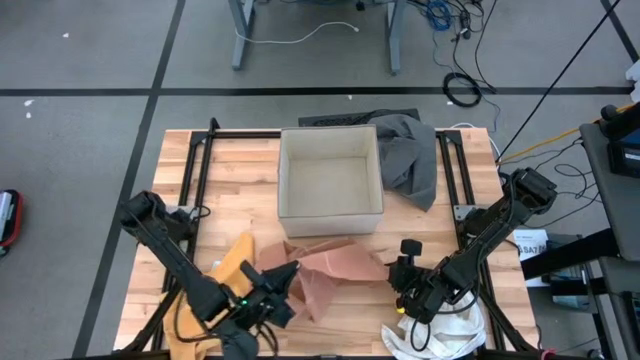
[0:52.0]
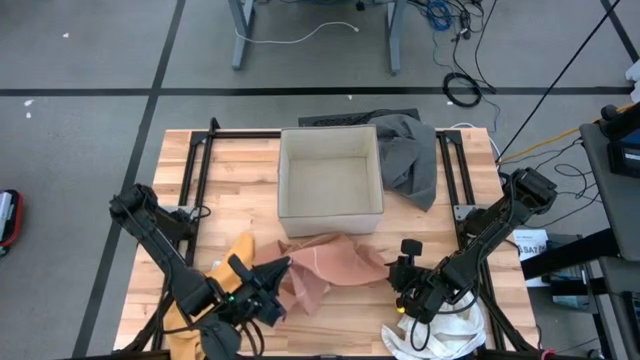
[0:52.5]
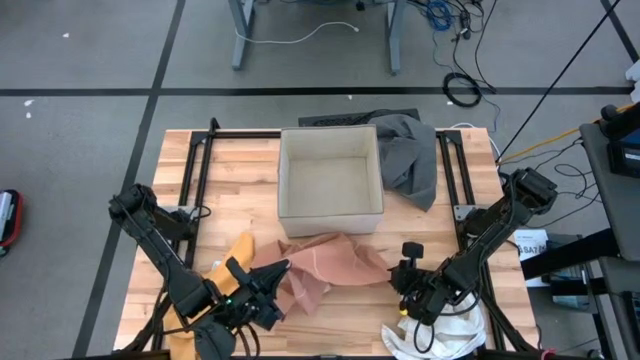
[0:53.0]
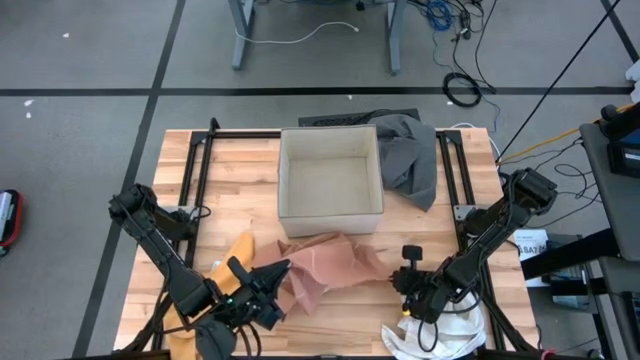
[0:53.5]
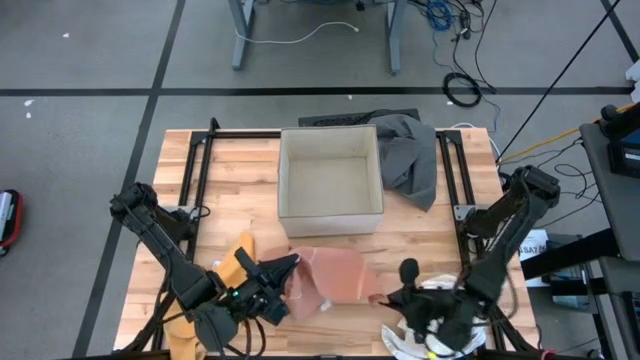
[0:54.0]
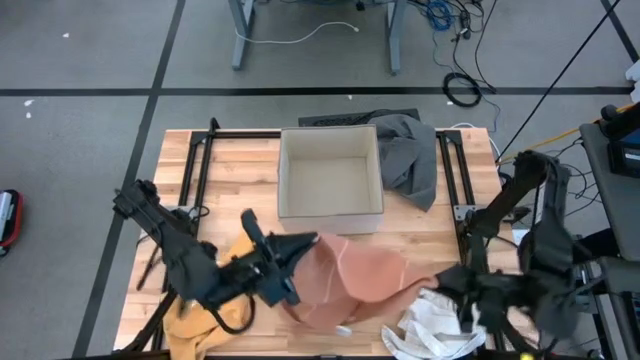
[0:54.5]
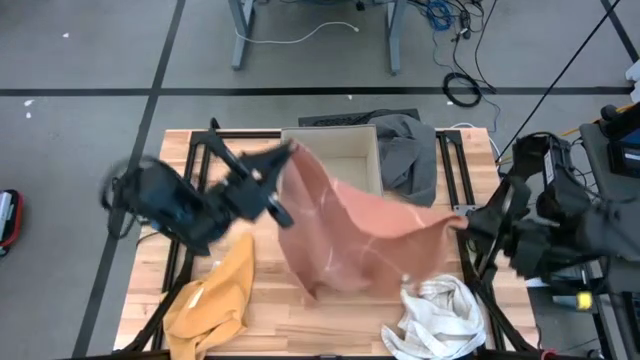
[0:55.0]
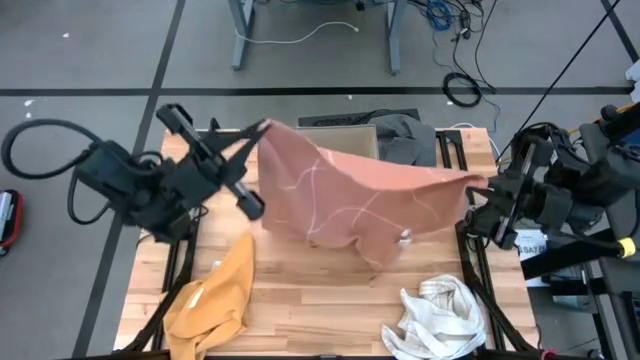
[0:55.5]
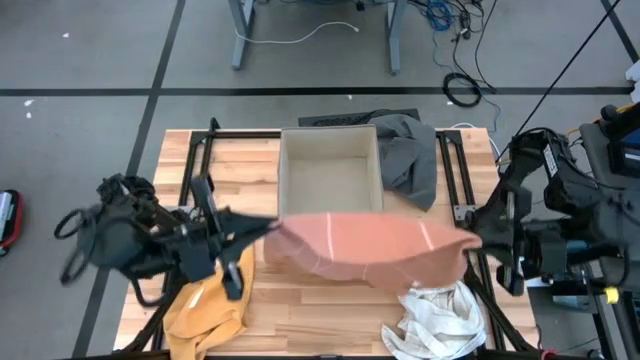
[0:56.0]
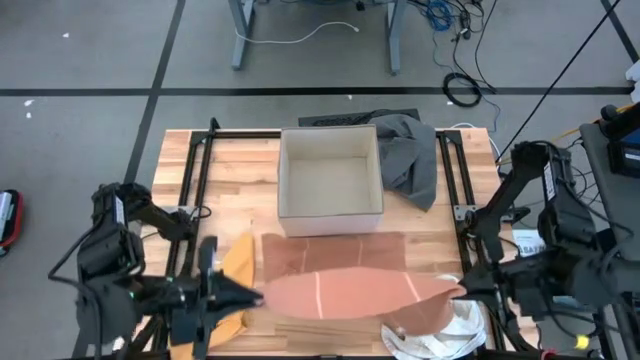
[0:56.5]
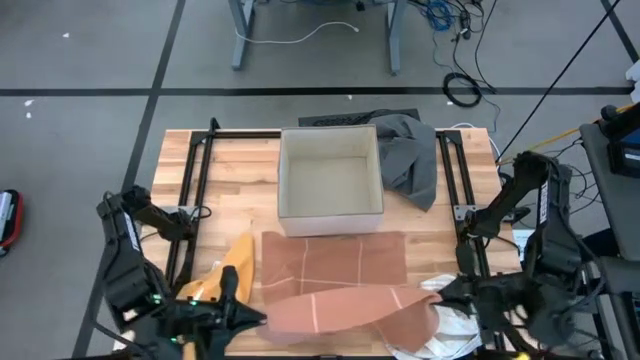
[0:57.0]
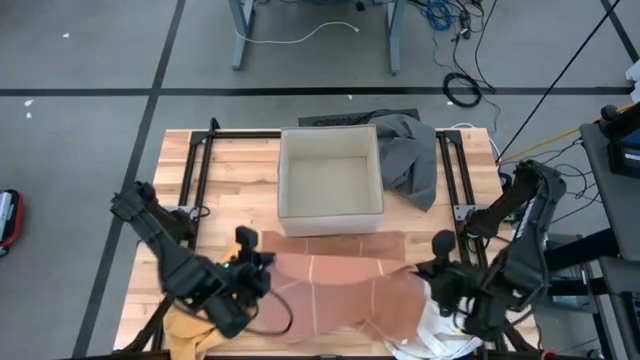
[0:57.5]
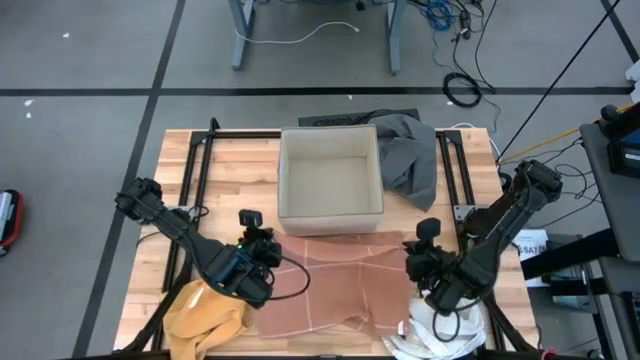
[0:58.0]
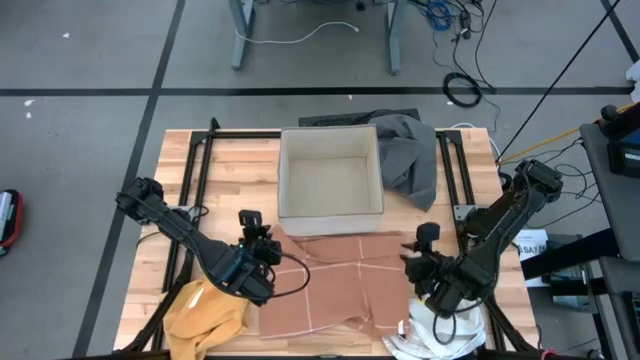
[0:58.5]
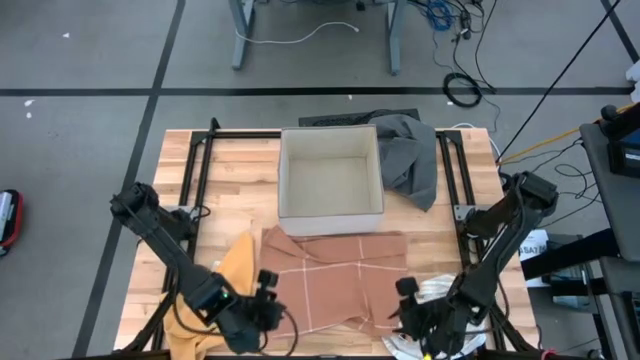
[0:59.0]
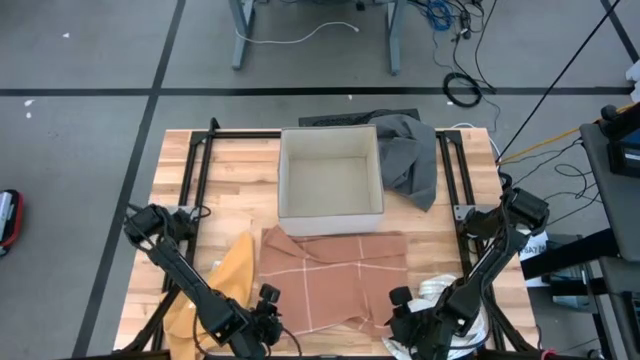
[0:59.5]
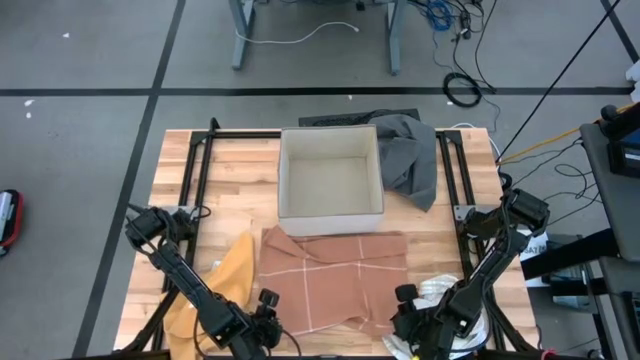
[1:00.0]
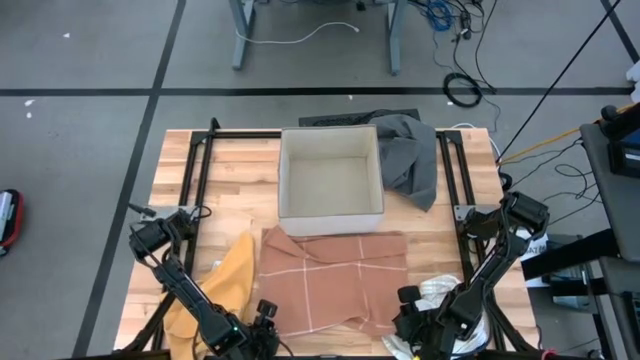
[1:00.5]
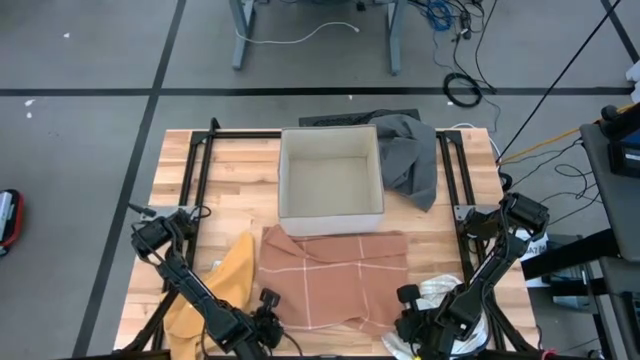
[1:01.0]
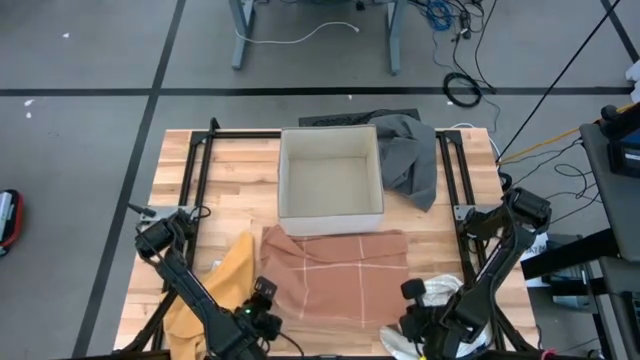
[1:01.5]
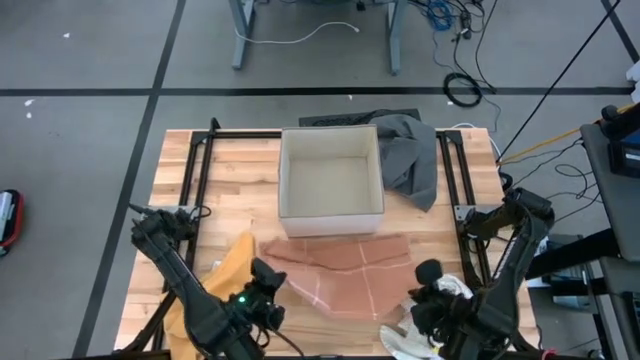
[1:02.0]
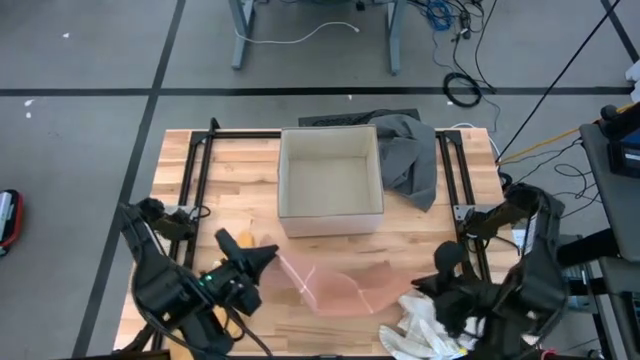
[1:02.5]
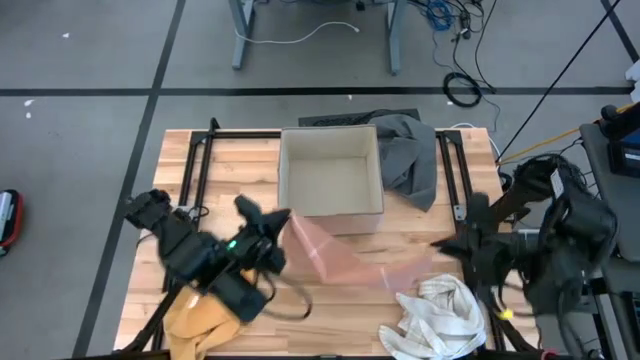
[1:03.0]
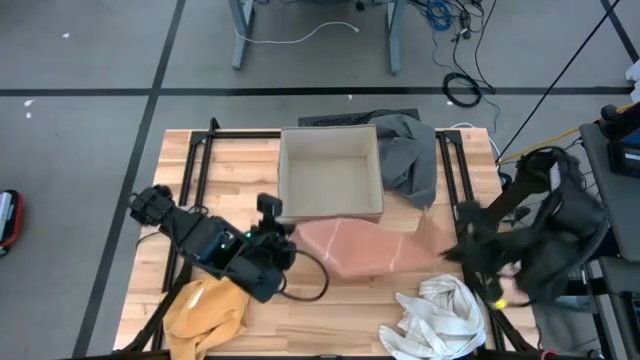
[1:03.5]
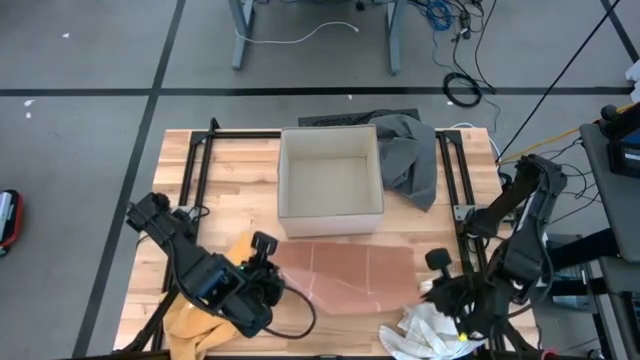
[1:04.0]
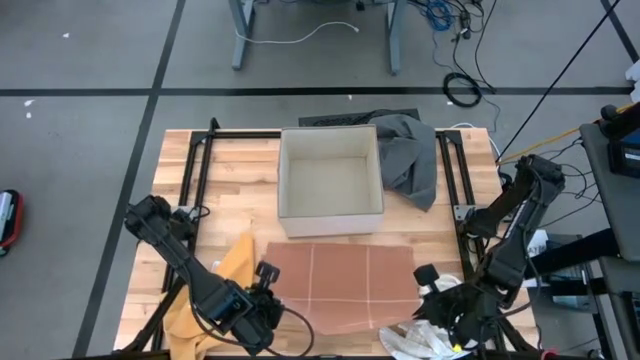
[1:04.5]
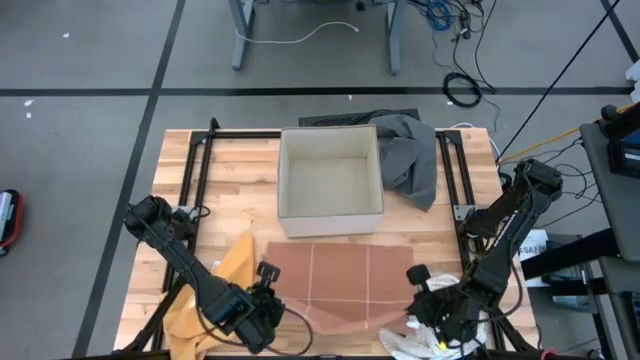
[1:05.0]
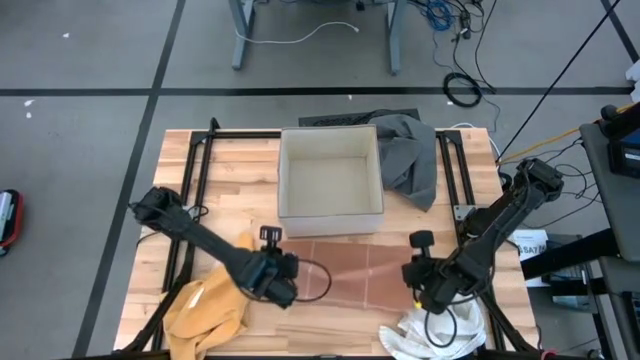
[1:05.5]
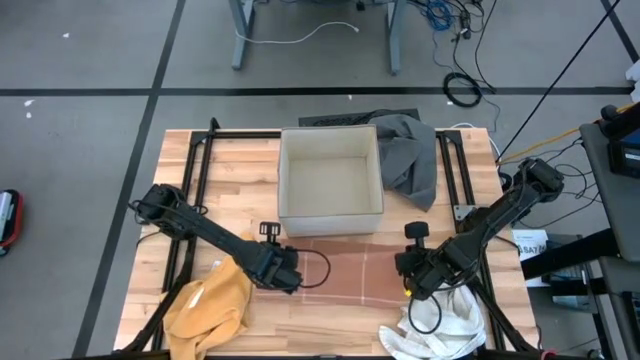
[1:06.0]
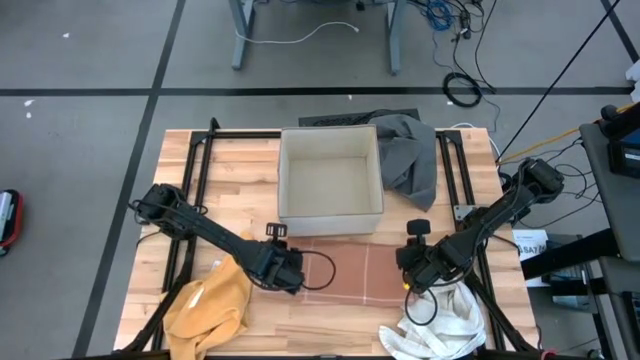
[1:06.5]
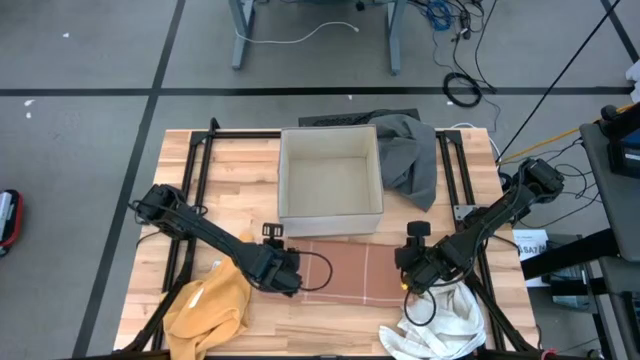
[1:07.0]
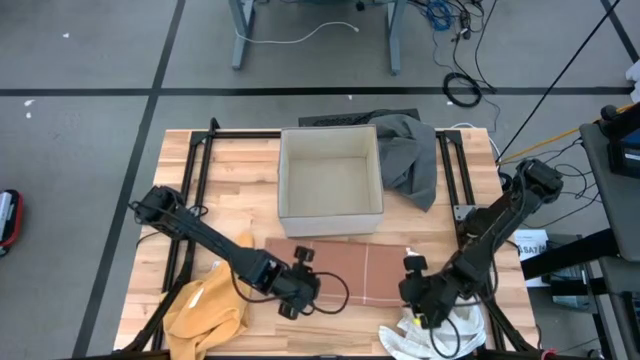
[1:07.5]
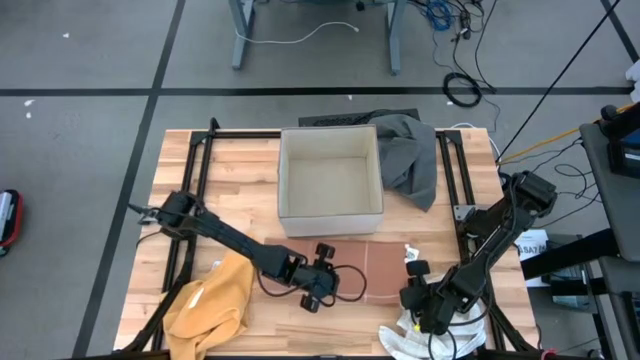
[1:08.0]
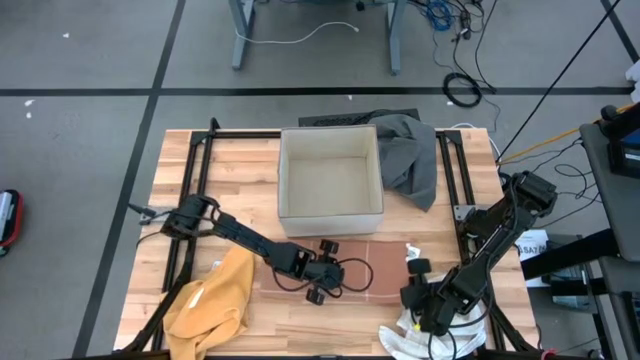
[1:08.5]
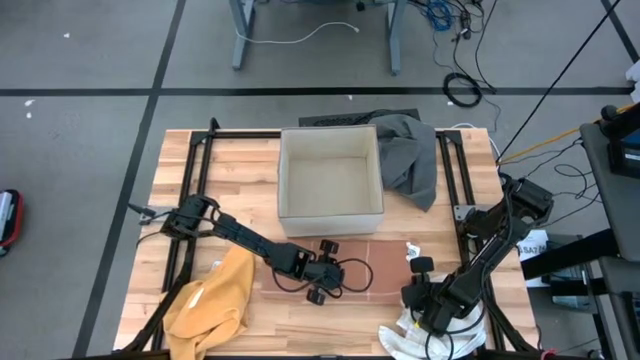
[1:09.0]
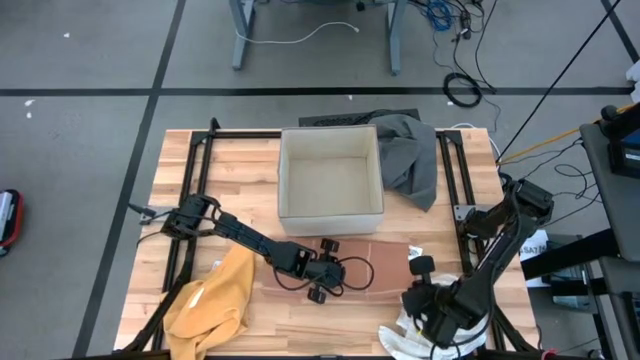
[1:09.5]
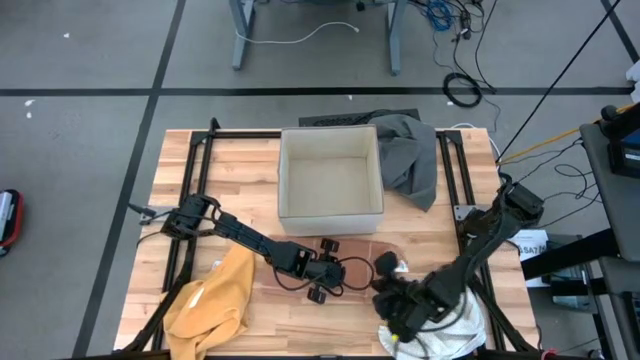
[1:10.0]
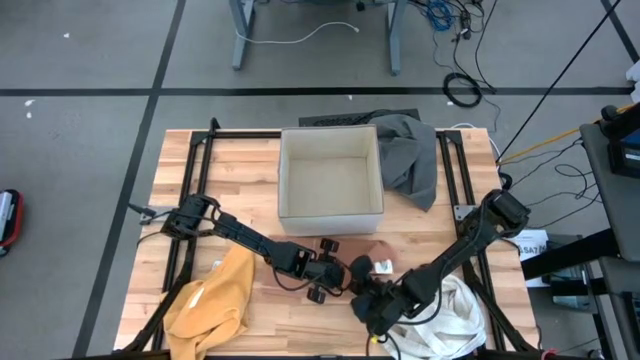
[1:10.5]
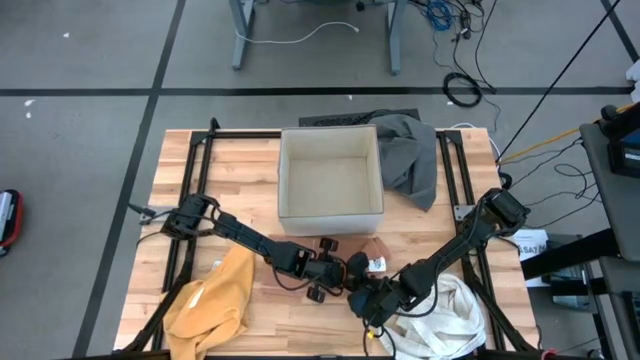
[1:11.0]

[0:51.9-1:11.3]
Task: Fold towel
Fold the brown towel
